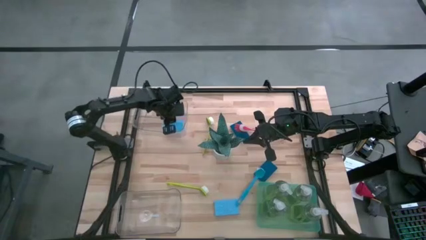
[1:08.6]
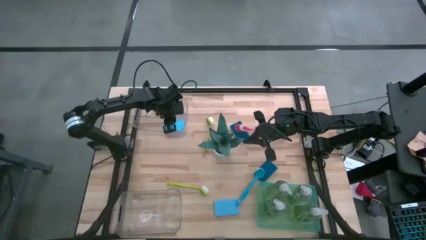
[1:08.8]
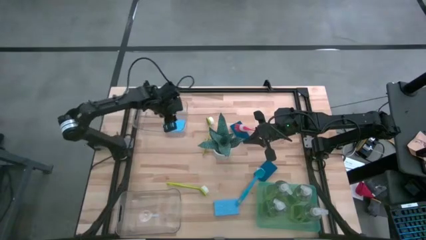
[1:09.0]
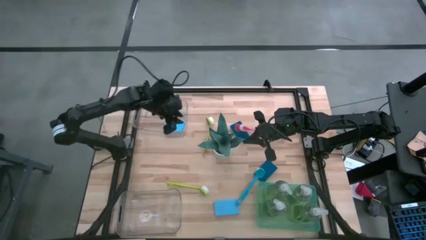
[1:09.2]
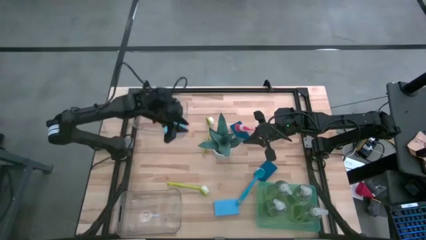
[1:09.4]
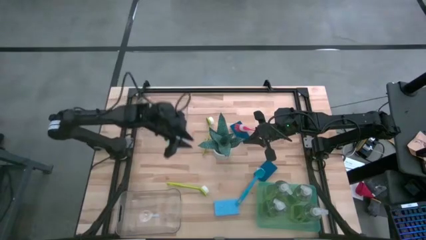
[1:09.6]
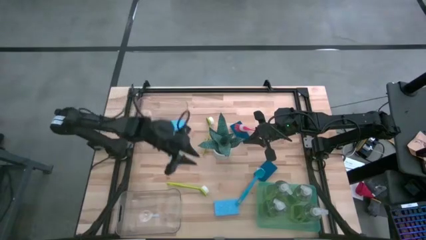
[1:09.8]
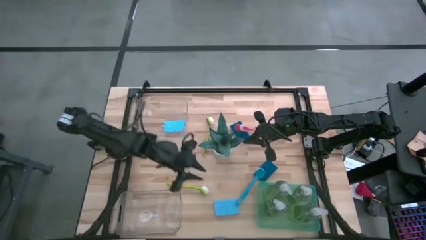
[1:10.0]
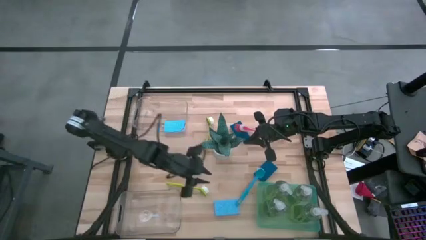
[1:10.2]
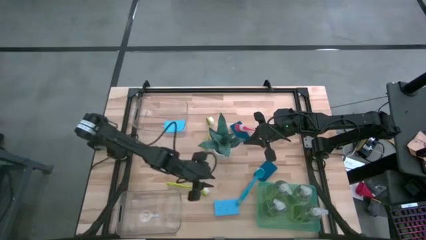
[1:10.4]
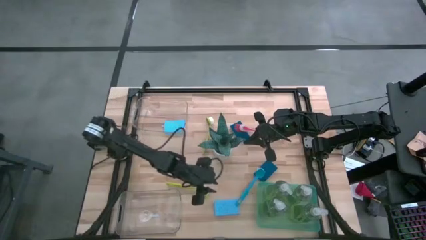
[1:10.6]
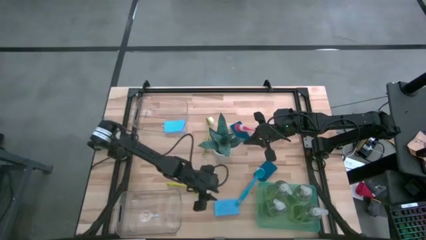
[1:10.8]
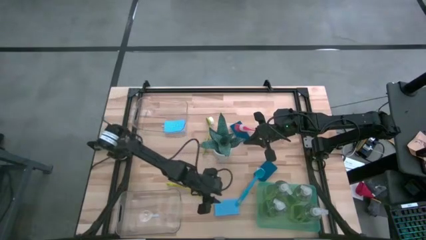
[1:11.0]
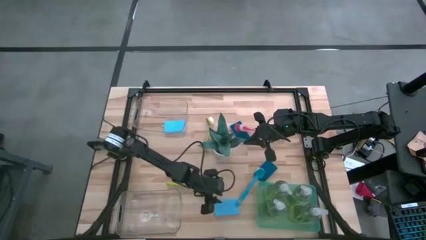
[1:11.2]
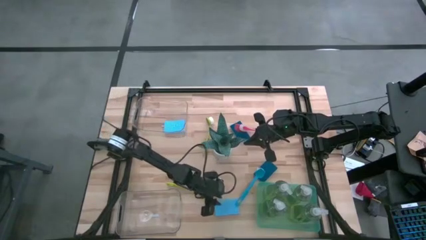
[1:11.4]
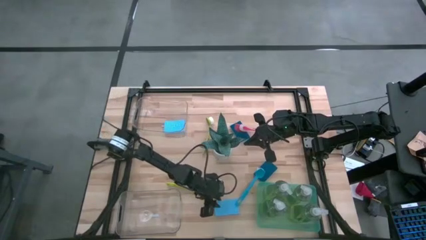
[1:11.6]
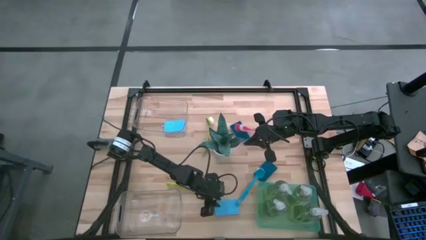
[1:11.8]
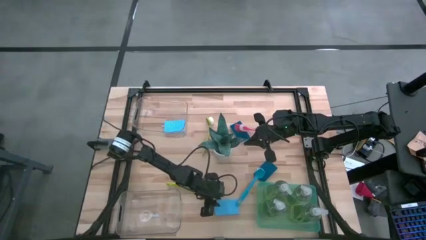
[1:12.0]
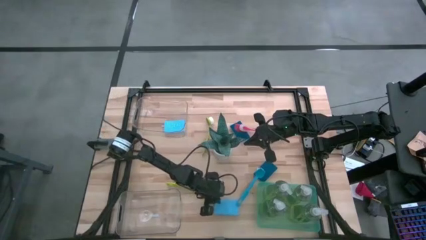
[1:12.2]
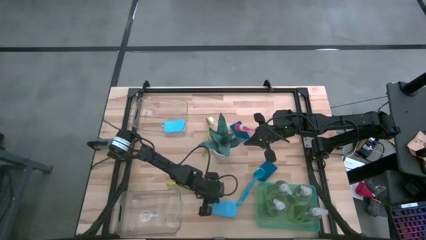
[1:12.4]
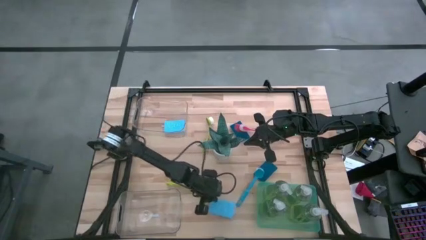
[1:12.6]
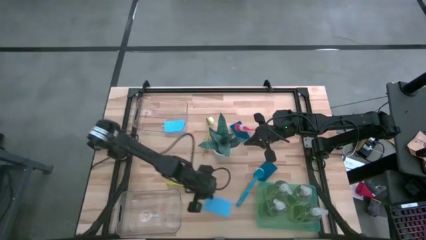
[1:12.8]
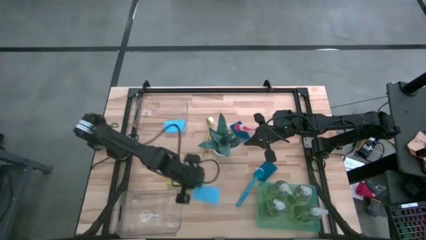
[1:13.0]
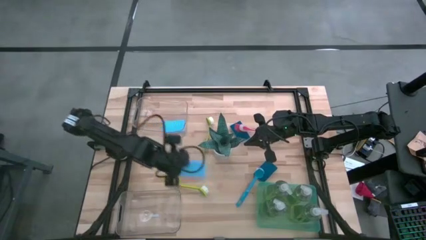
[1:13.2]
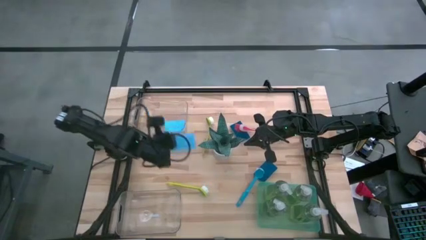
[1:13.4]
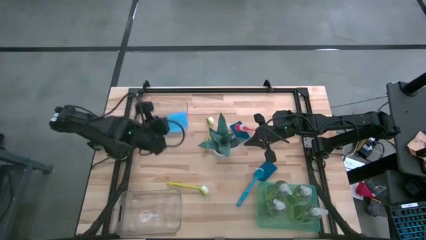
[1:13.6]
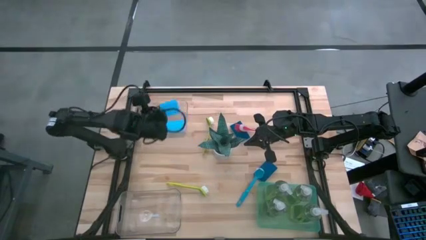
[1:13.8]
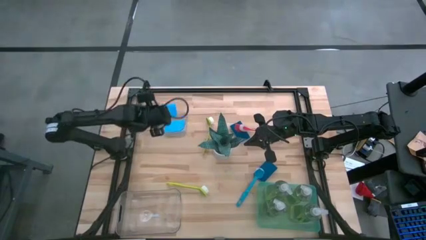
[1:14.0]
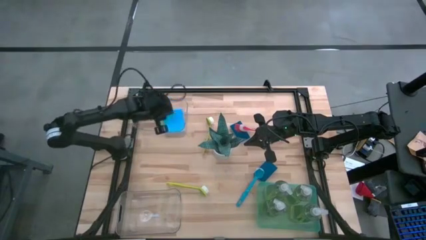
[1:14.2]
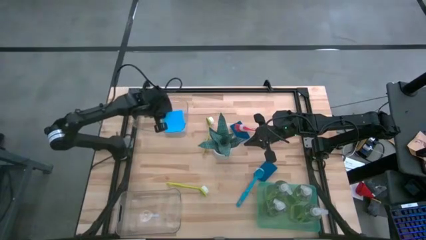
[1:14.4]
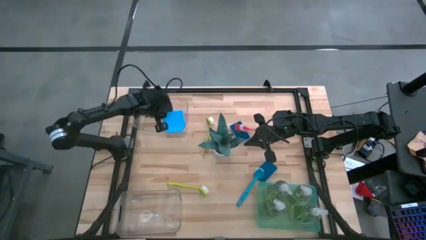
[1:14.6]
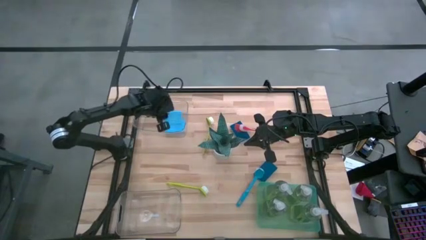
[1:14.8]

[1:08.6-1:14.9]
Task: Pick & Place Kitchen Sink Supplies
Put the blue sponge into the top transparent bin

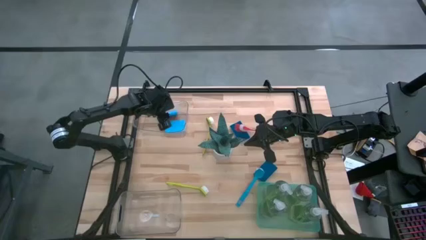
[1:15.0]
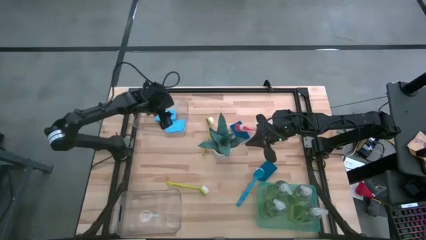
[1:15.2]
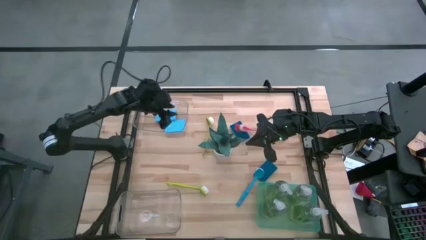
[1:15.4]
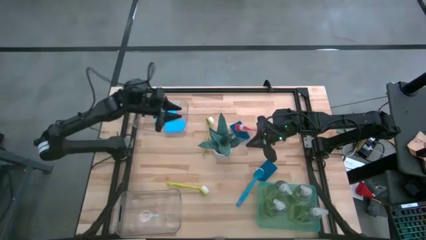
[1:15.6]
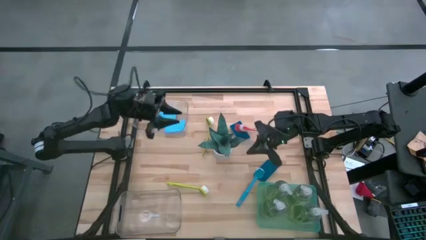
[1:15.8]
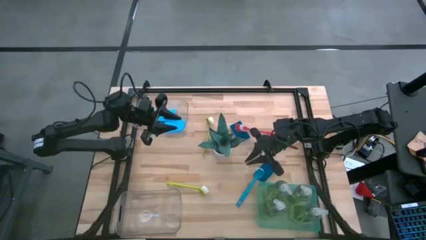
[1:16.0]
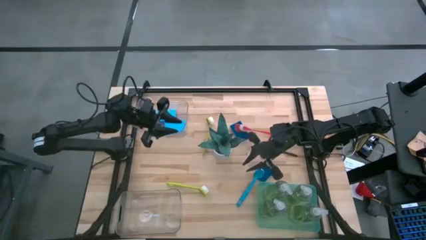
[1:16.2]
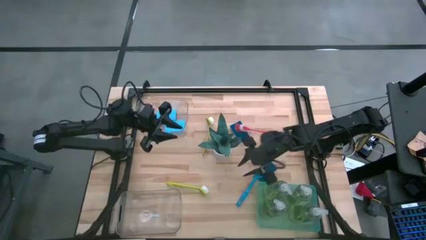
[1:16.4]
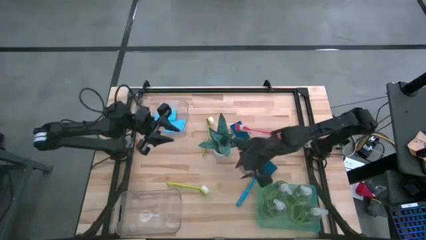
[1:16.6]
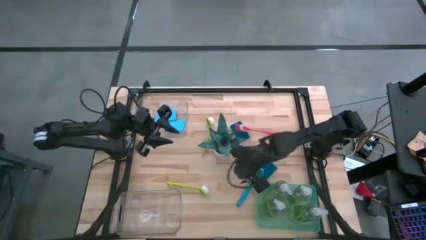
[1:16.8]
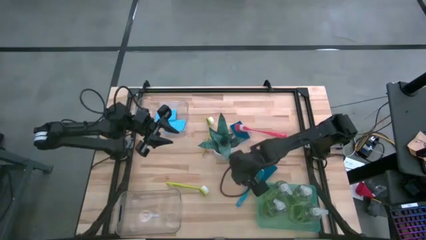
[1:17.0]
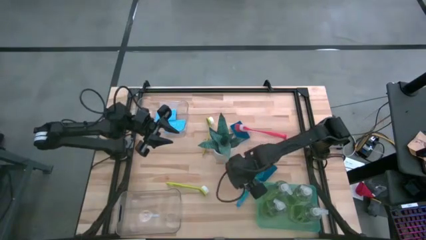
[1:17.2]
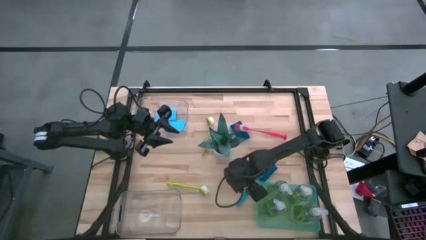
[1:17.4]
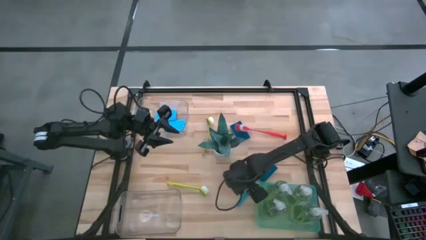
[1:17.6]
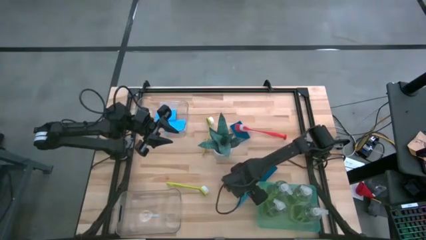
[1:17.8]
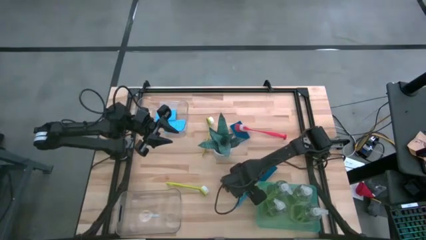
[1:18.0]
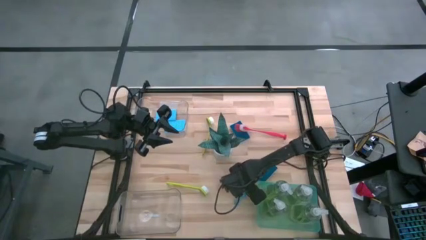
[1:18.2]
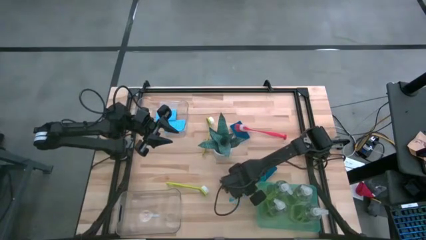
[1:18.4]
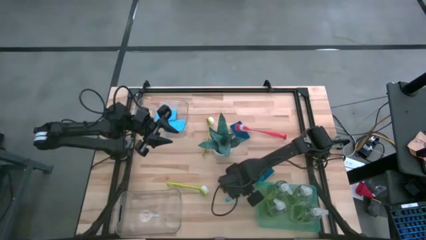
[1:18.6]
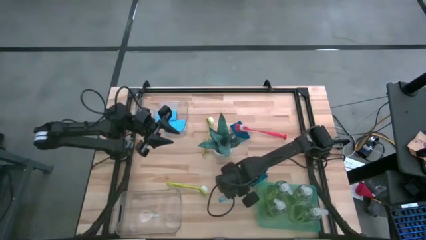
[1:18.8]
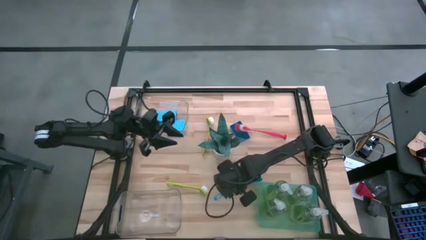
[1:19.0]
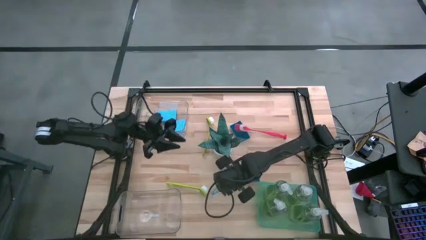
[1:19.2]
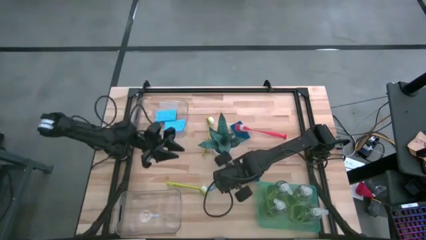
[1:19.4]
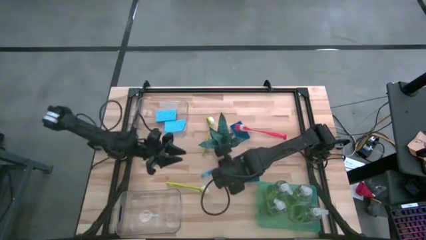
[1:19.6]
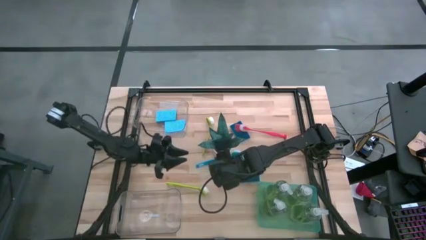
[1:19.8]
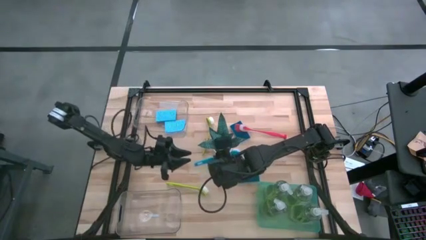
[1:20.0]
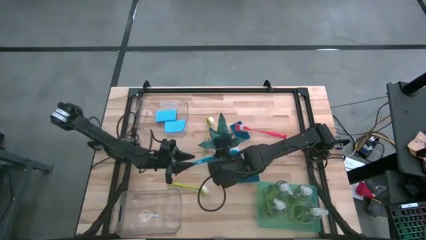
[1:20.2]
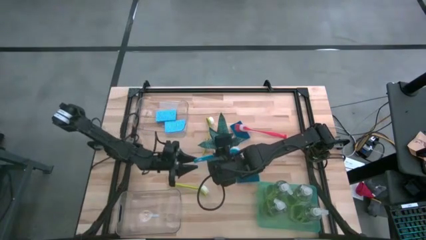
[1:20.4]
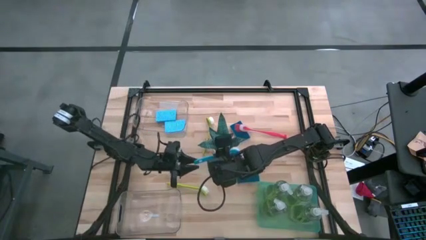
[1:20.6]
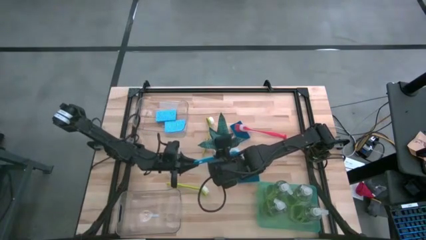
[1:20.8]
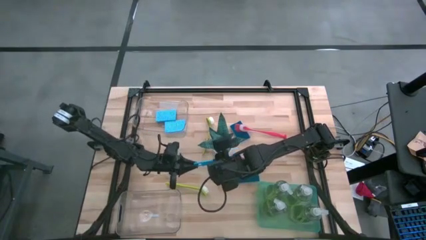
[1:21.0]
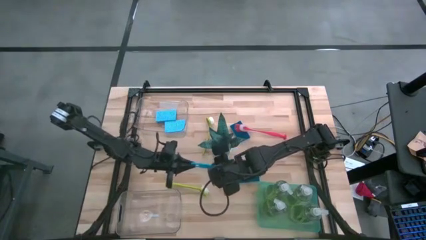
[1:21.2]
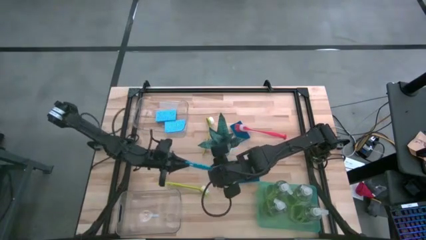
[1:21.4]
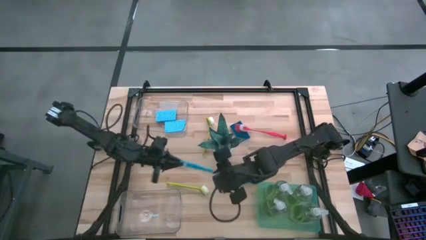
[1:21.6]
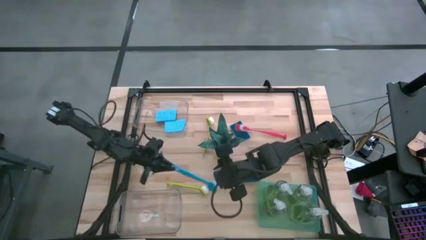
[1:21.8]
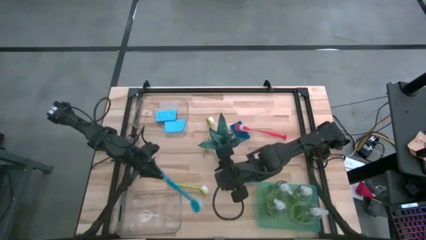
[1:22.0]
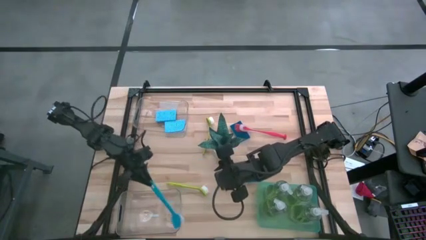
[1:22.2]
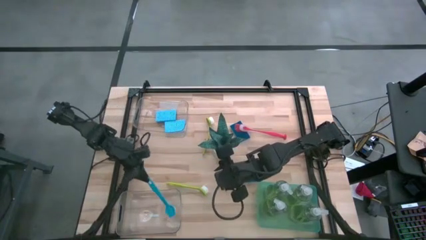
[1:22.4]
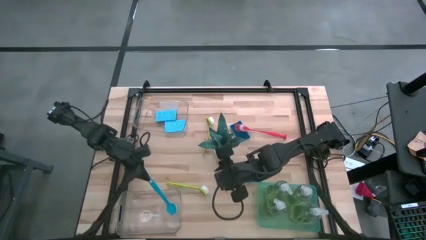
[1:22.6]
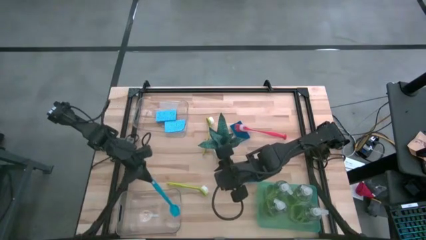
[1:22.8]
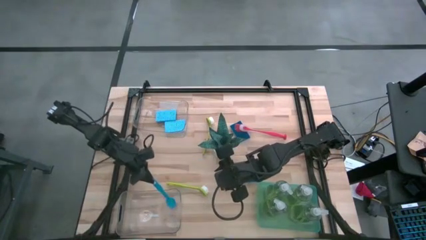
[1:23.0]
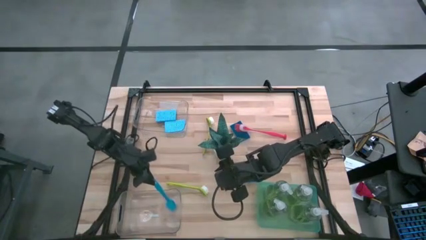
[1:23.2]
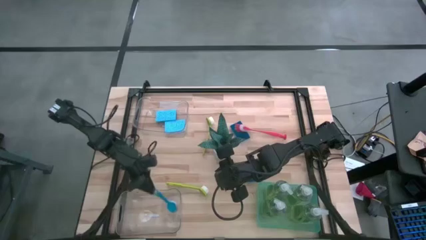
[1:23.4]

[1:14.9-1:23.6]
Put the blue dish brush into the bottom transparent bin

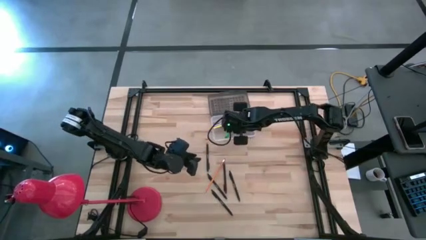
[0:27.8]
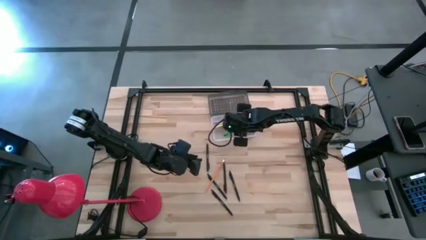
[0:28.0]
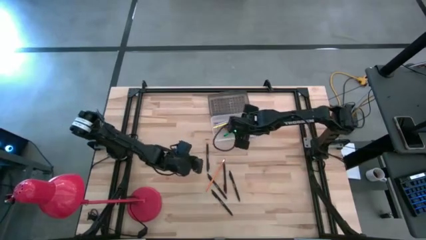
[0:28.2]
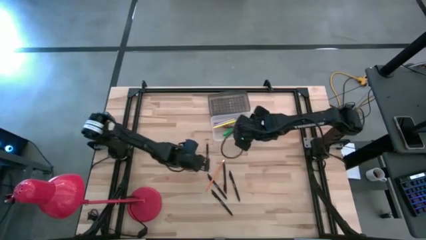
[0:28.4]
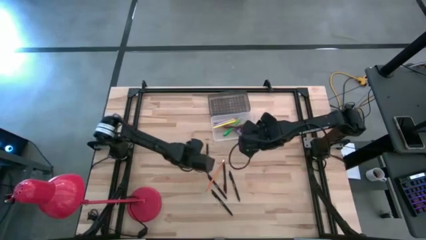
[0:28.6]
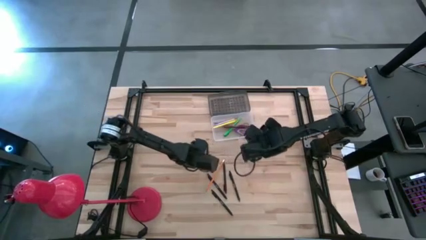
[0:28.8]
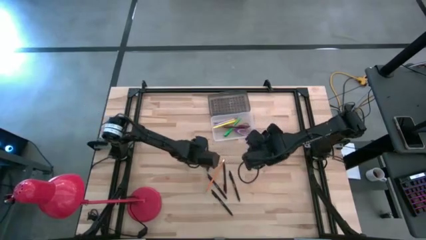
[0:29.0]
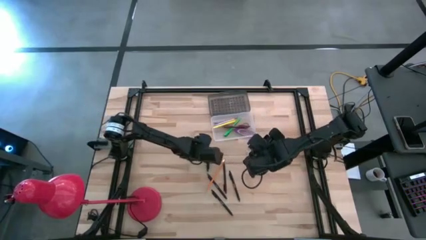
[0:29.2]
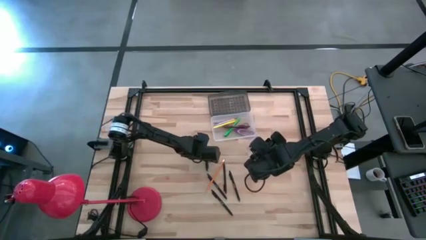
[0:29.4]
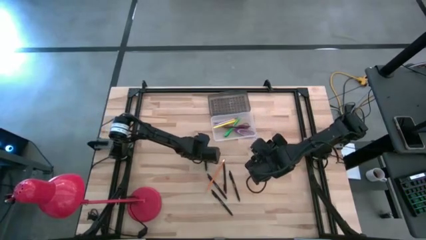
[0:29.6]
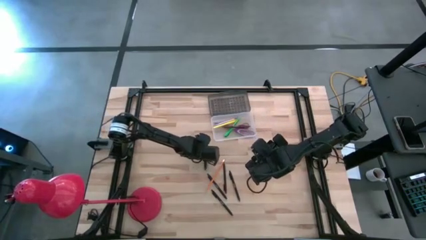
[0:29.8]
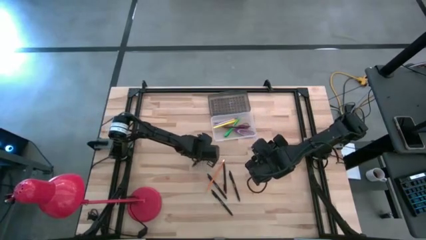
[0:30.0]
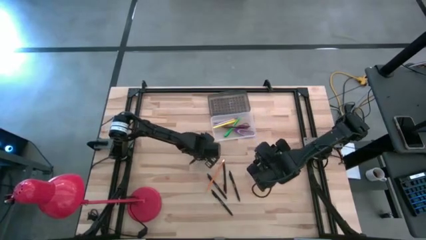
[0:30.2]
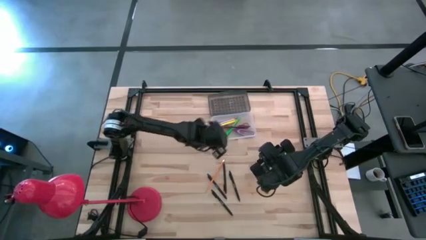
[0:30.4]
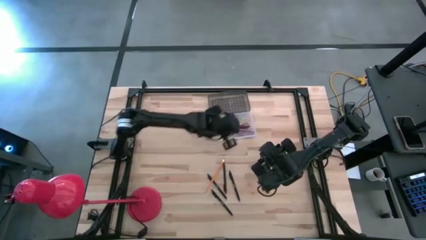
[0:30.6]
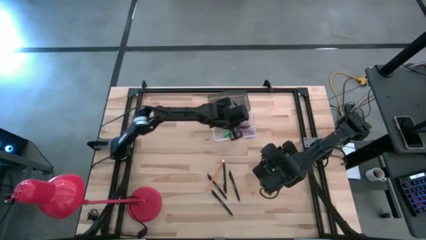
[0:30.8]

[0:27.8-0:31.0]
Task: Pick & place school supplies into a supply box
Put the black ballpen into the gray supply box
